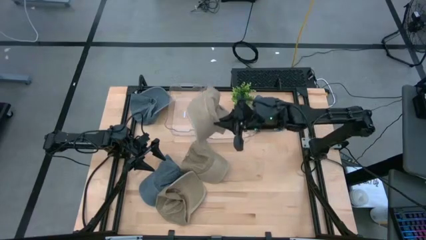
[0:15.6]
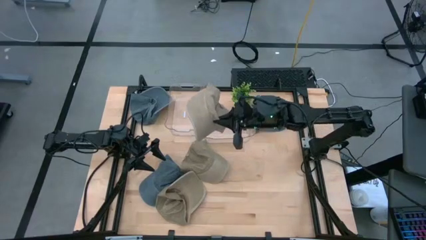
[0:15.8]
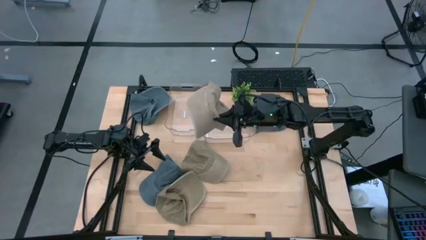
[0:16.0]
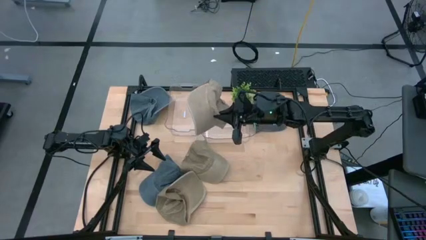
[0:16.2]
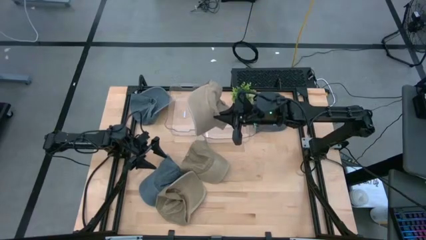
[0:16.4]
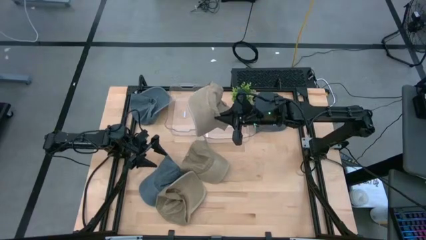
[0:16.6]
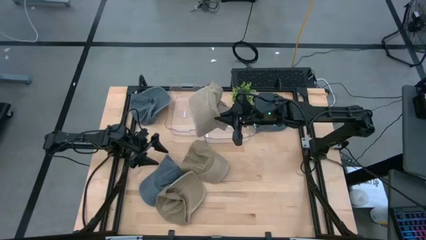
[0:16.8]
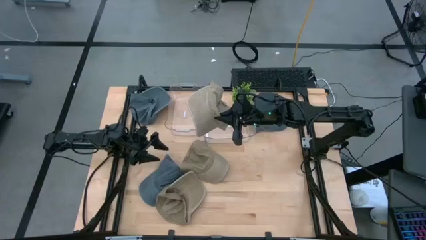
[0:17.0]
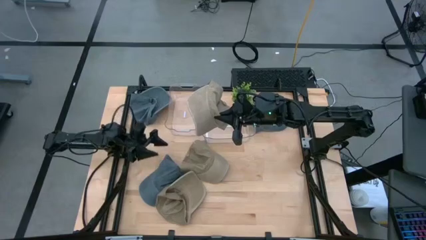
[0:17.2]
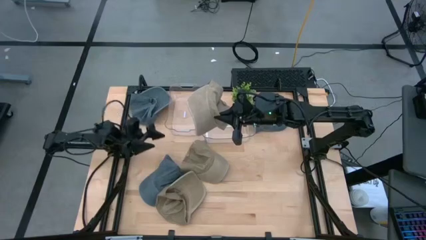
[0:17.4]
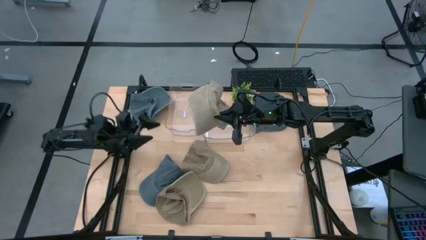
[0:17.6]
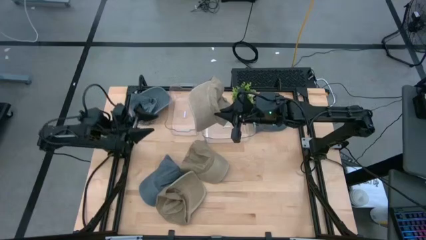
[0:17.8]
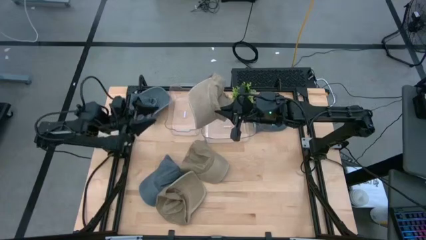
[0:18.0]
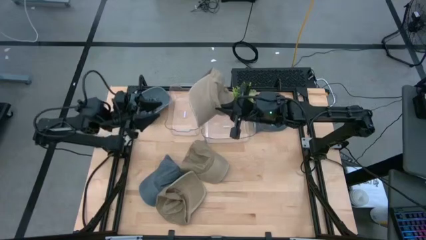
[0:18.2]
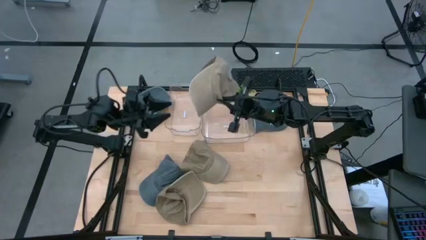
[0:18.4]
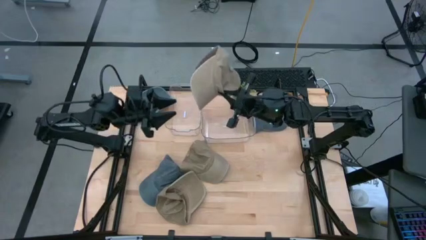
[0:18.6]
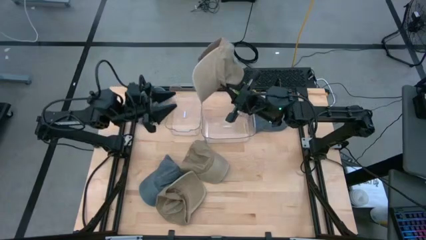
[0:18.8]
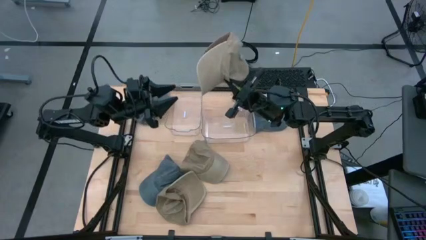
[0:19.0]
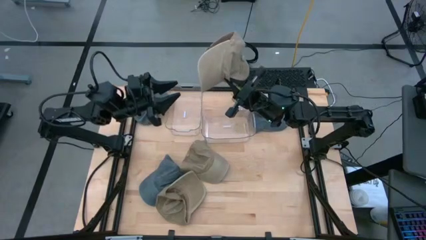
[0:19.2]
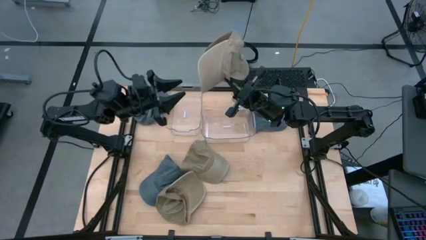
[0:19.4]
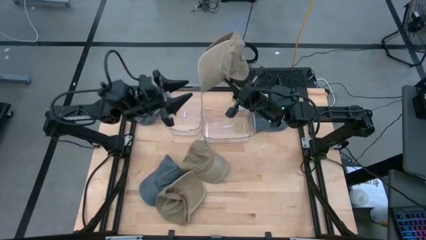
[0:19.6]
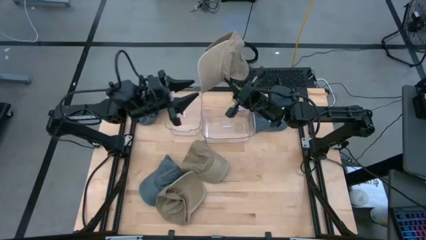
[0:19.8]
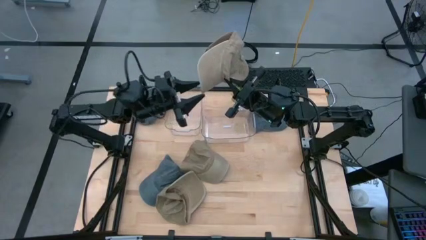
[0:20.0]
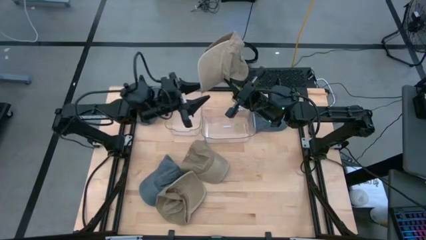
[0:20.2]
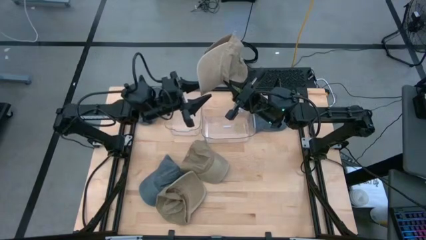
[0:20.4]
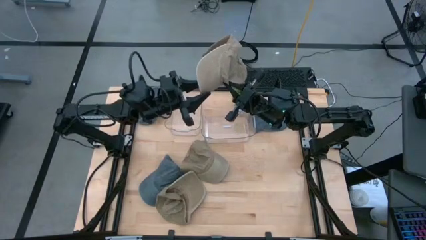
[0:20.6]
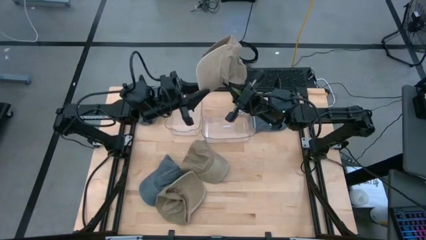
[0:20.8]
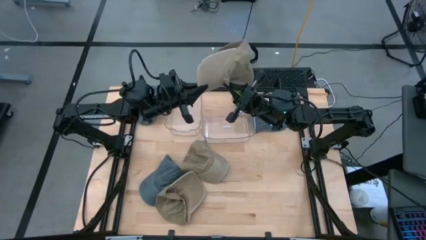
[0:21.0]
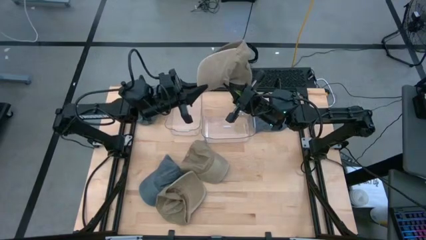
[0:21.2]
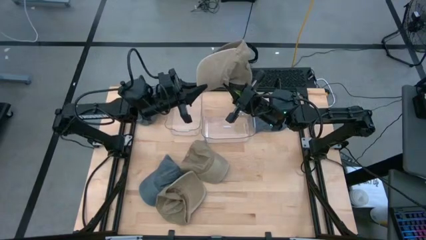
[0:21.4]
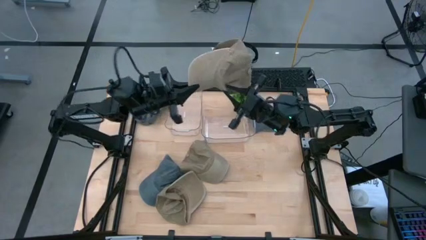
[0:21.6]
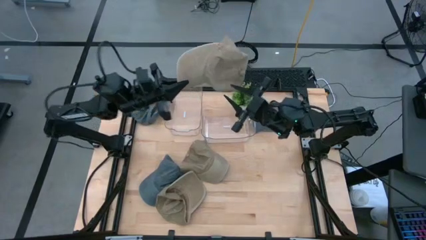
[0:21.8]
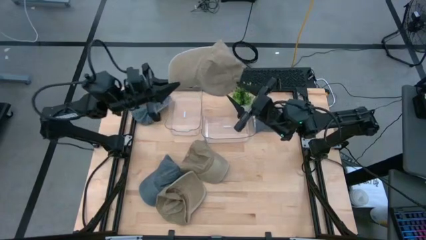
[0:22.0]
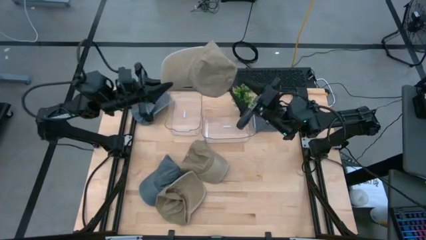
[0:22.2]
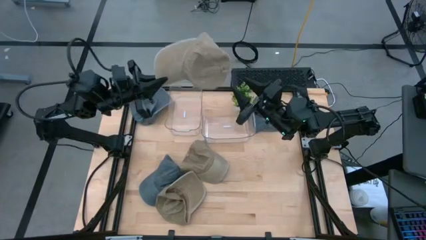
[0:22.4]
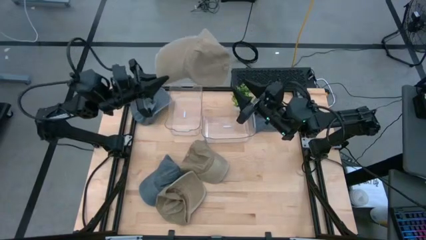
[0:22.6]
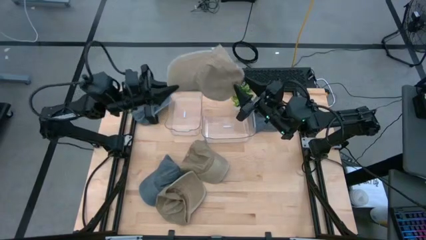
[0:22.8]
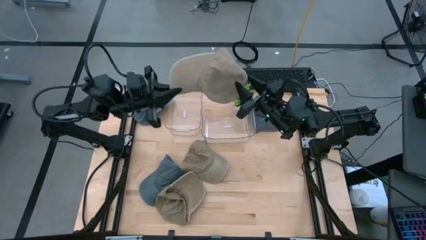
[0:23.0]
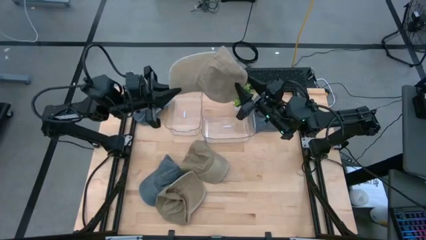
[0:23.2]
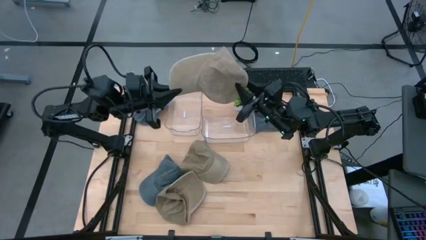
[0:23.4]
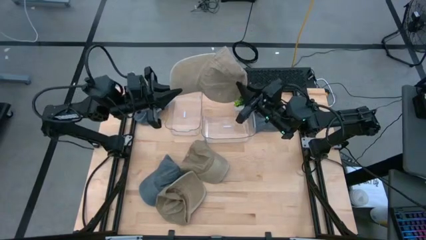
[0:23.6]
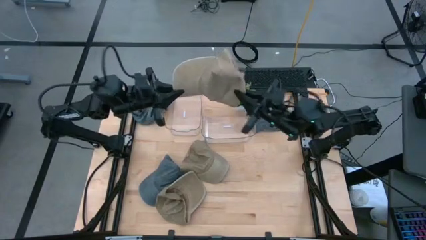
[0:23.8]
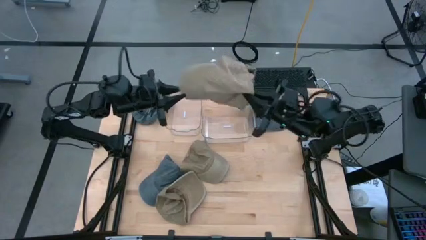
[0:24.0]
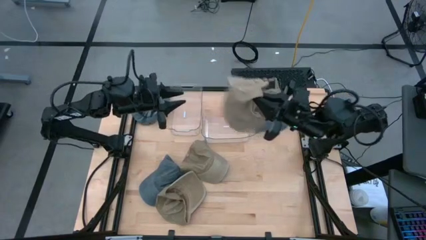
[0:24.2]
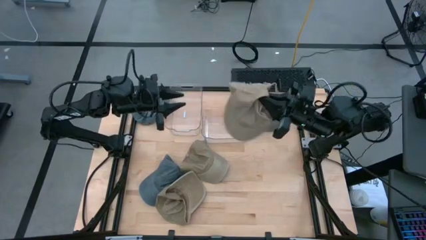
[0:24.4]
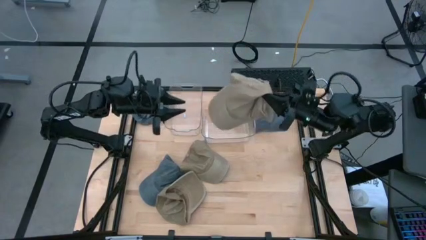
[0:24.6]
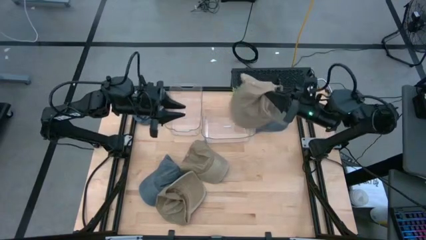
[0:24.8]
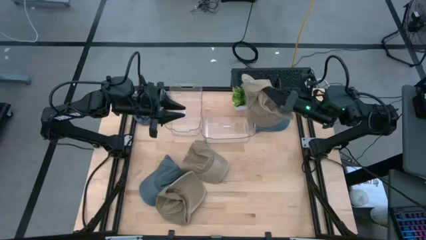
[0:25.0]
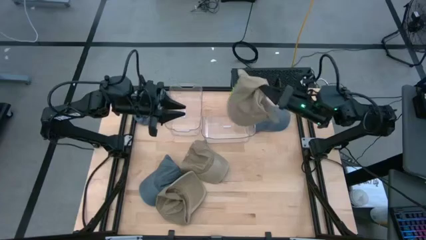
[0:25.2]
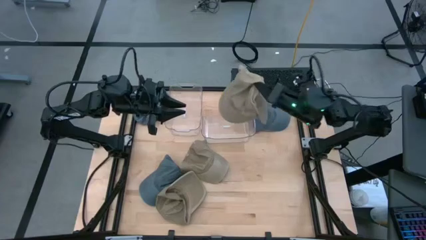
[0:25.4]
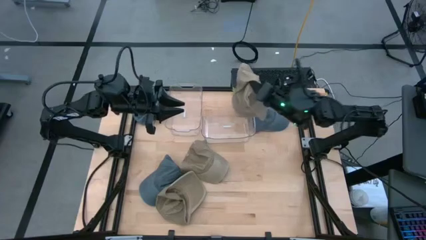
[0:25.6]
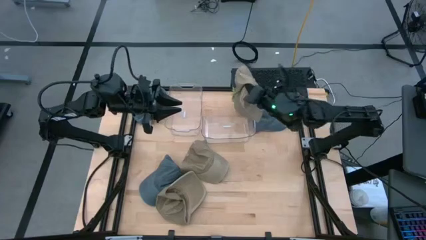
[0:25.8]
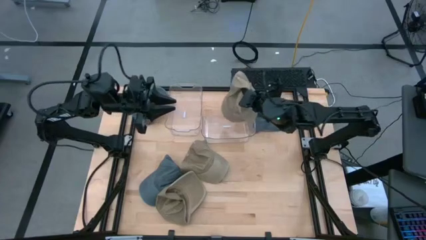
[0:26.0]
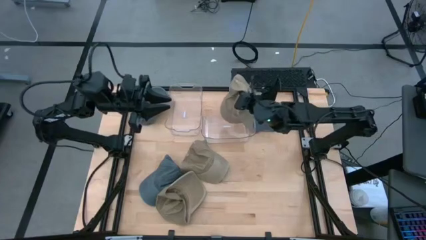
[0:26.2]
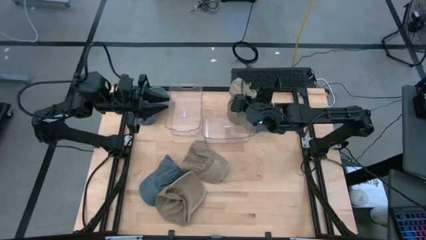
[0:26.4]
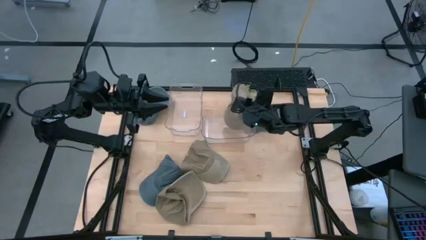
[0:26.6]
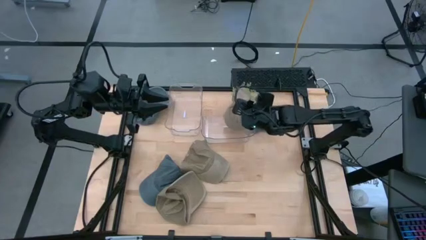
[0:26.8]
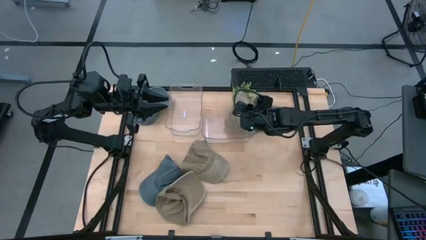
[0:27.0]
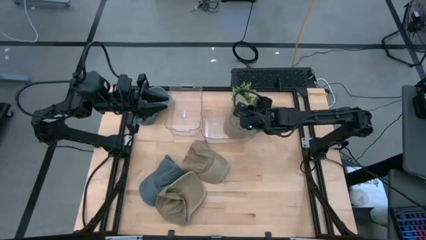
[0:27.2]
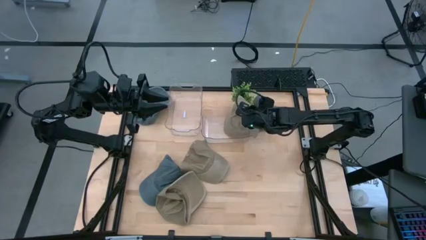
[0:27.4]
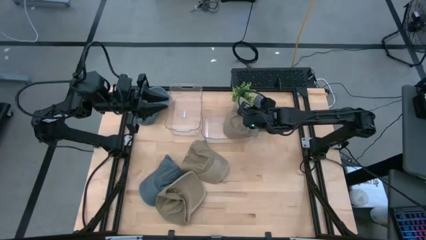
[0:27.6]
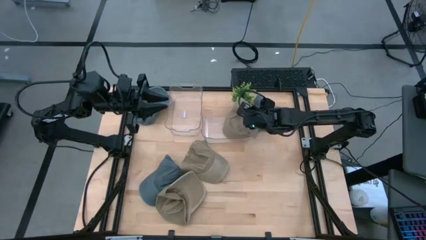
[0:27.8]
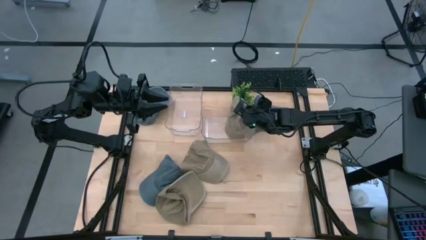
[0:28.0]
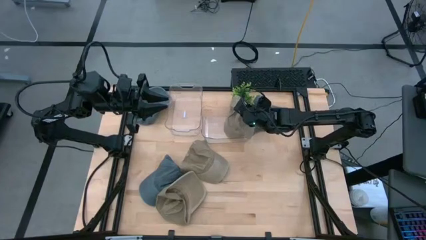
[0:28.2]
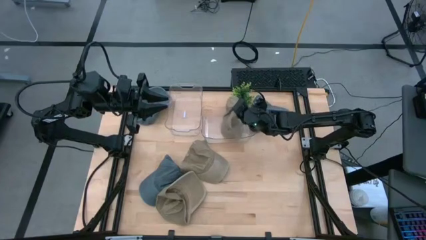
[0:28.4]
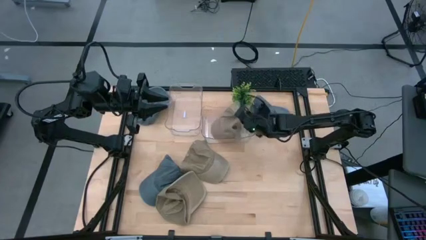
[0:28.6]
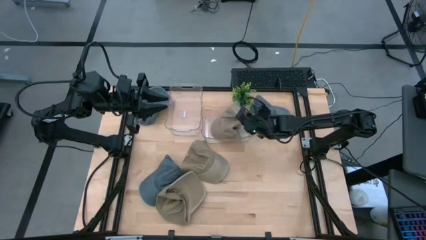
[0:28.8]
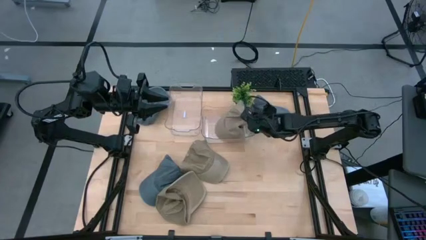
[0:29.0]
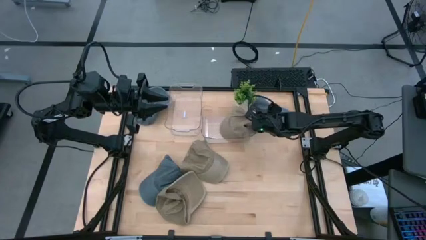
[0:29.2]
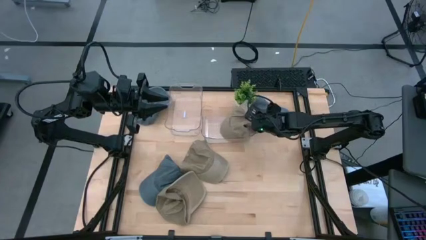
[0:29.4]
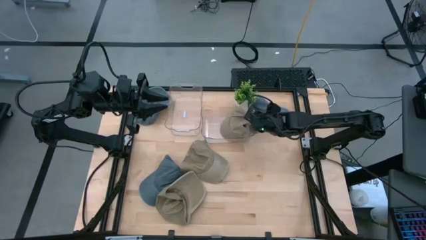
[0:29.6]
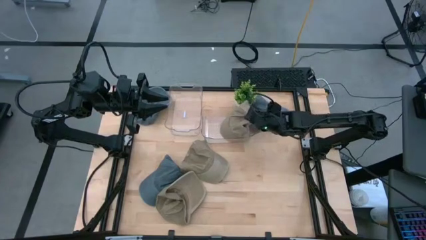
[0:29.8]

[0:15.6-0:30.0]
Task: Pick & Place hat
Put the right brown cap into the right transparent bin
